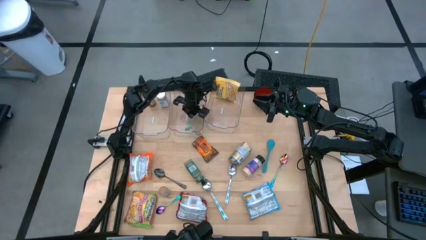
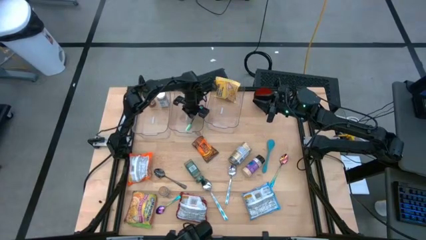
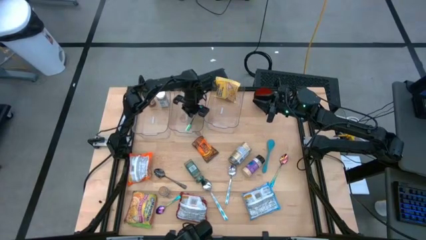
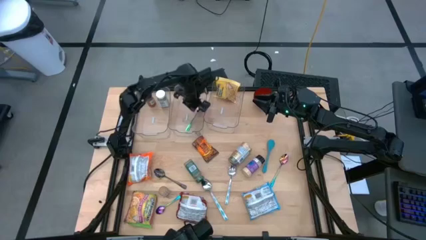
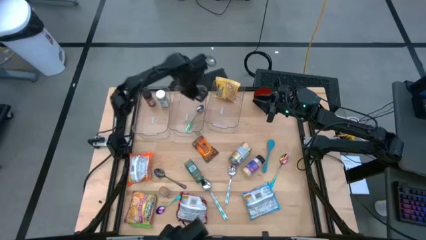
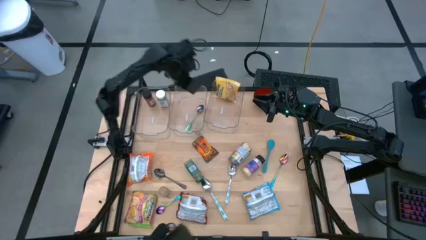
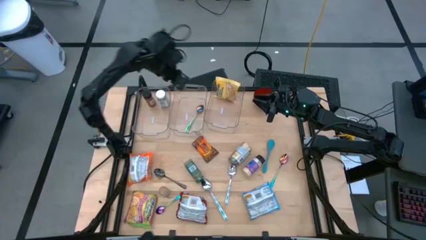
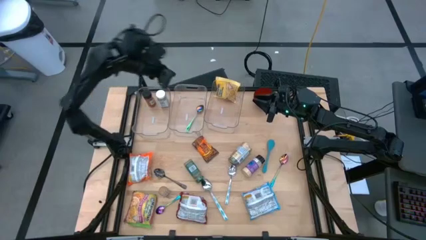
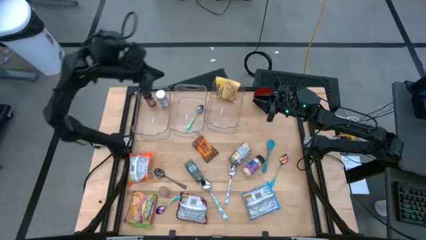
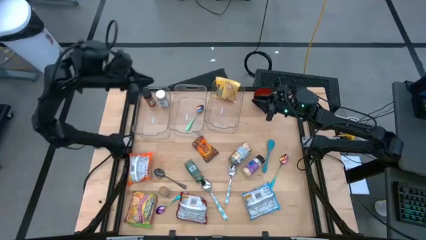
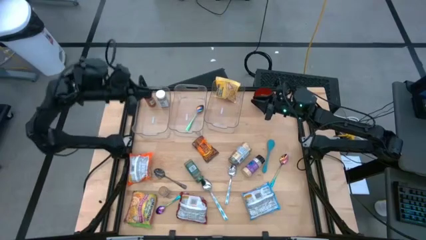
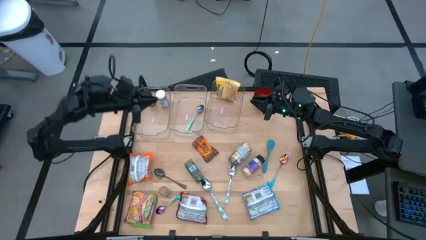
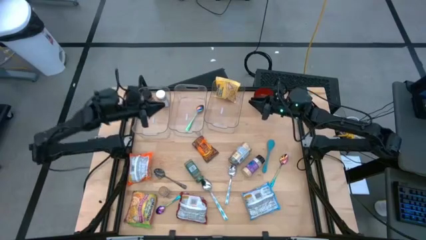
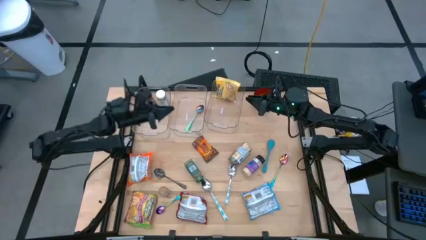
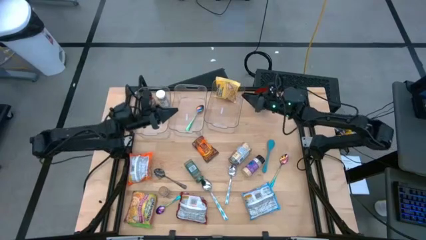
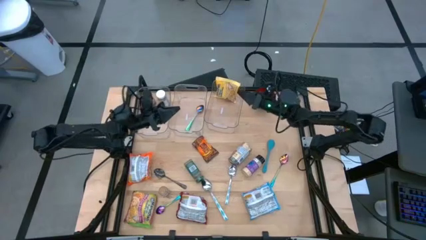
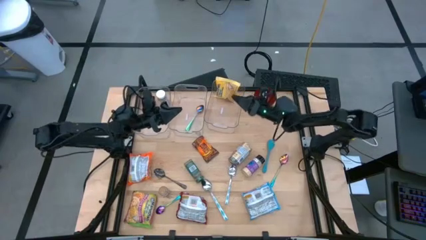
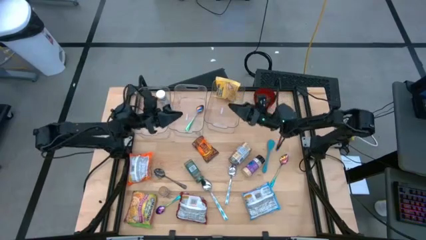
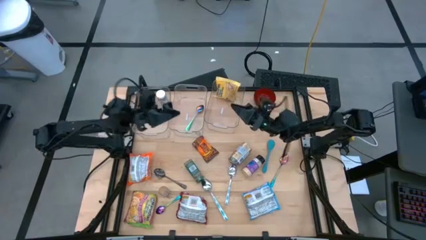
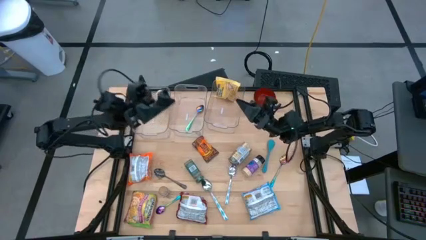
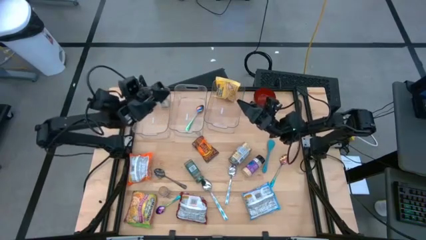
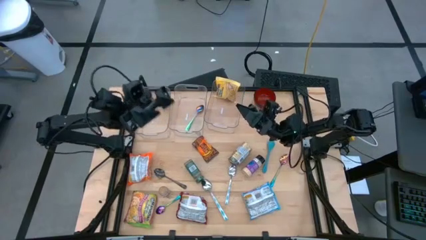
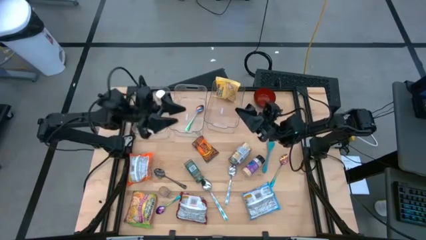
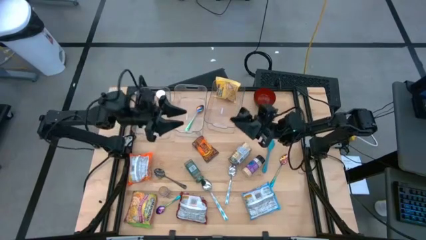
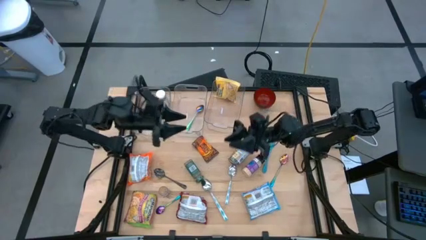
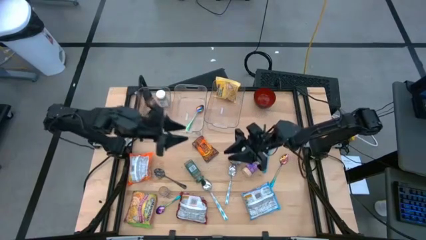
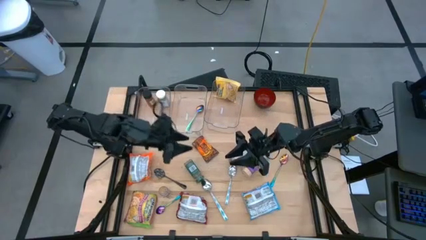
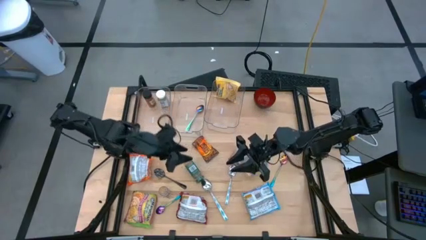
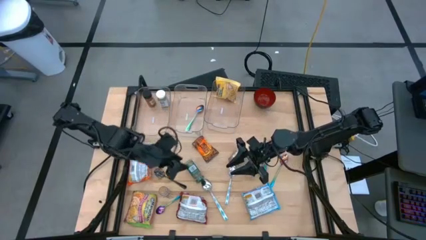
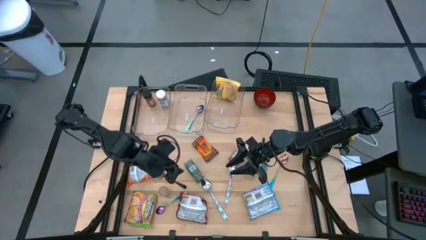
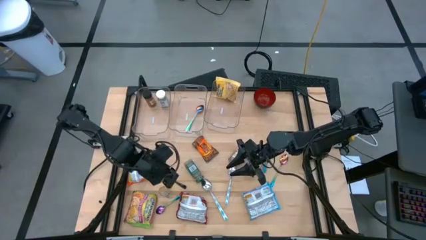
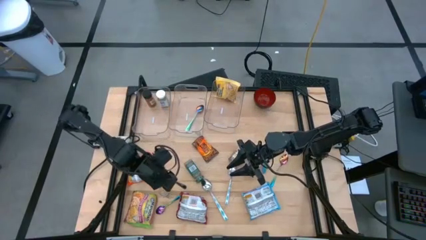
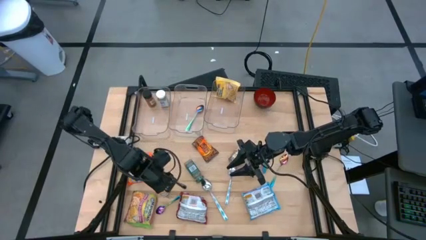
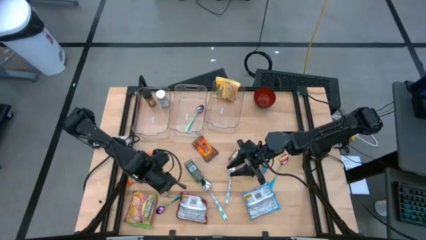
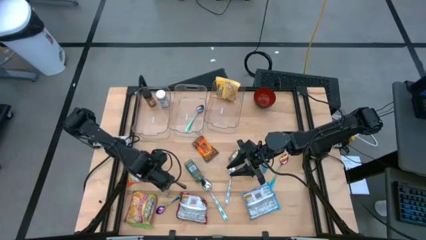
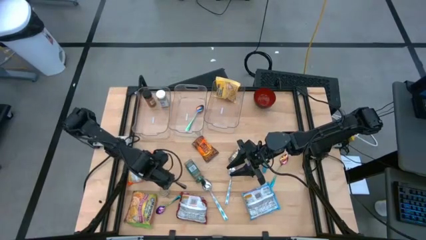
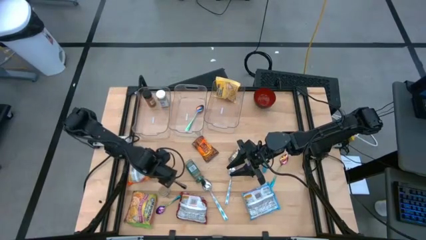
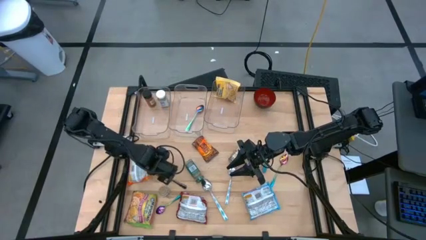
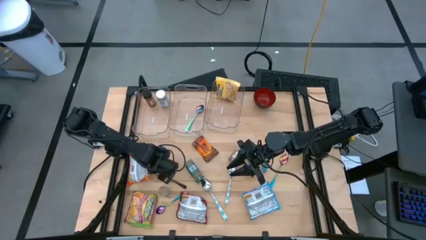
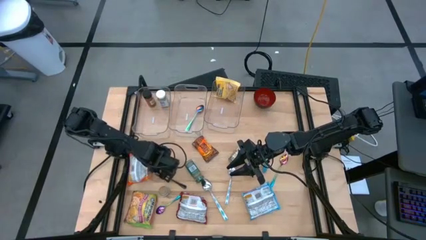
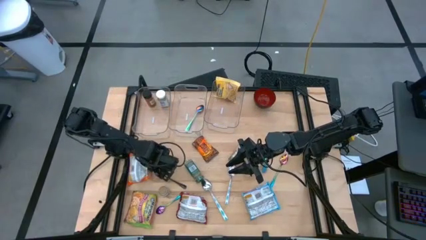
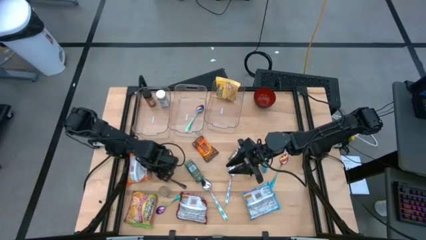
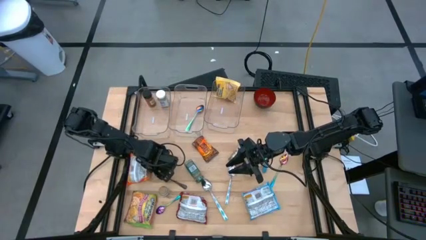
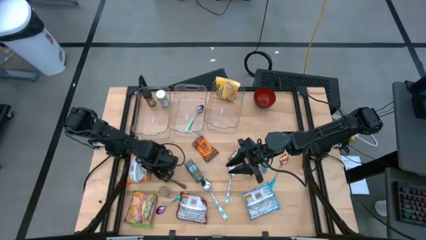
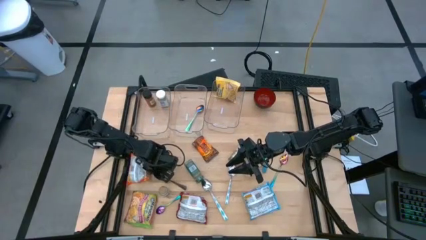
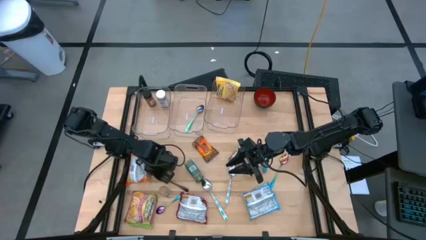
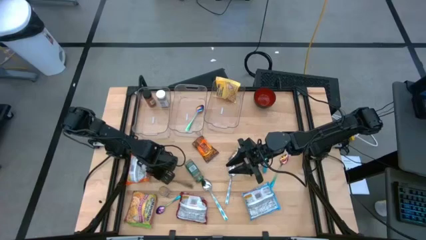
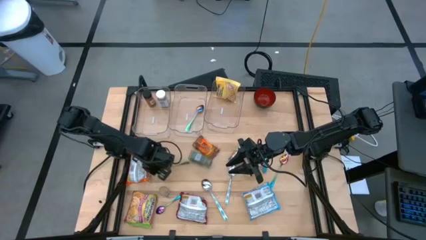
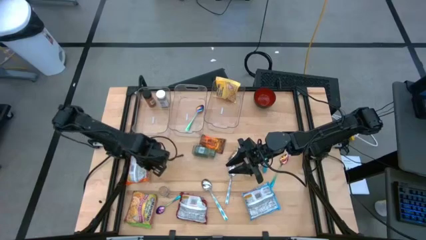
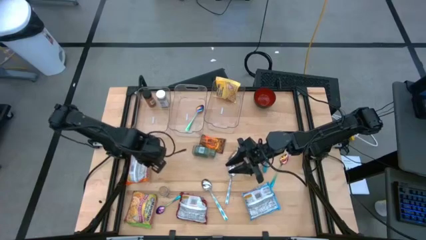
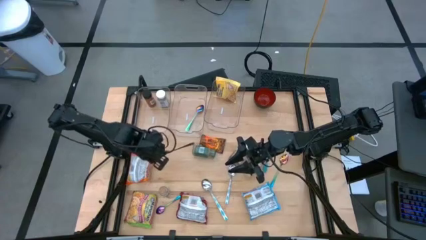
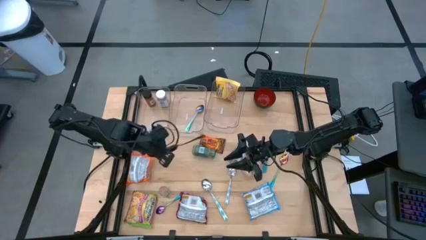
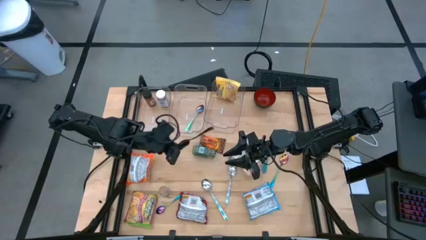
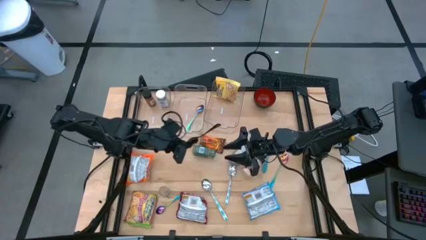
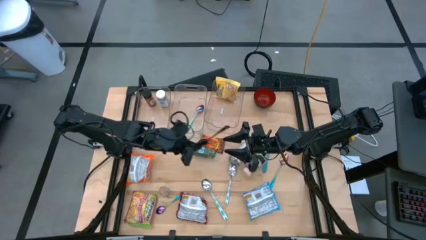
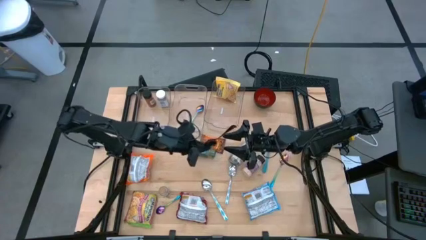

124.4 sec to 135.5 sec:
Task: Pick & Place Food Item
Put the black spoon into the middle transparent bin

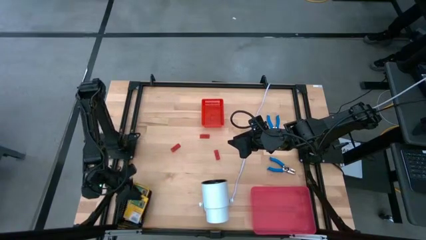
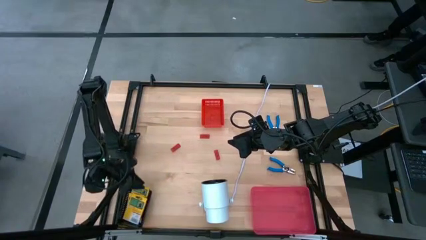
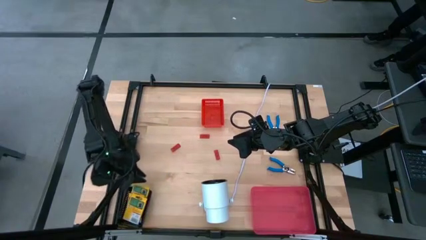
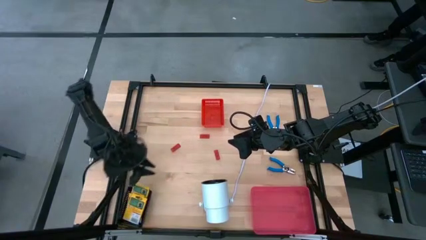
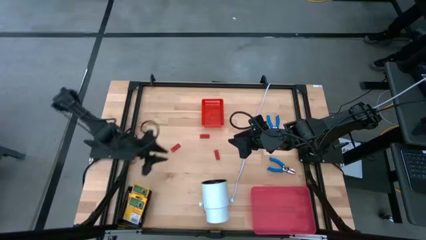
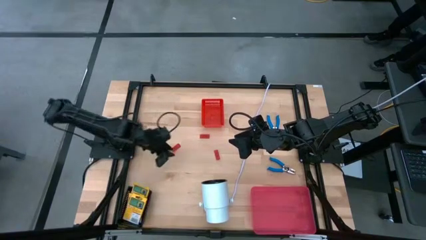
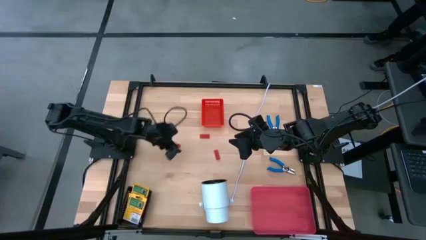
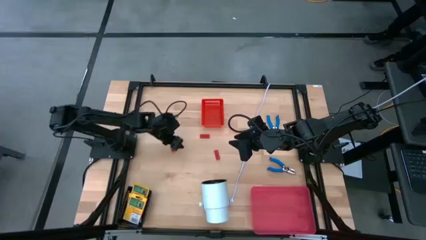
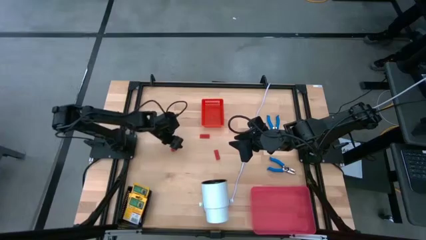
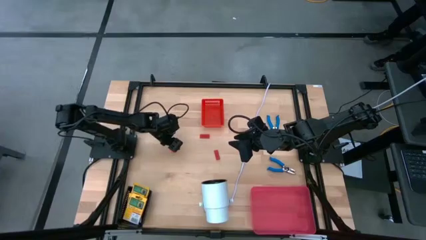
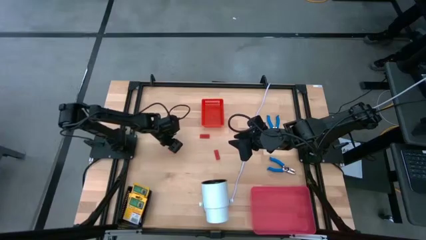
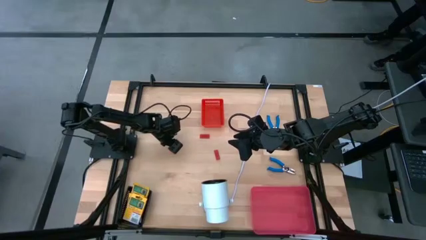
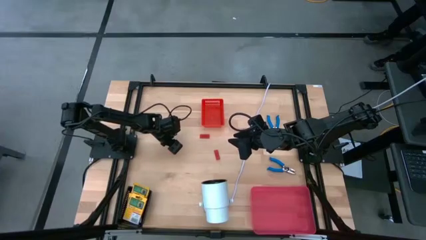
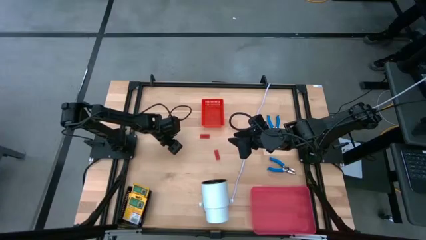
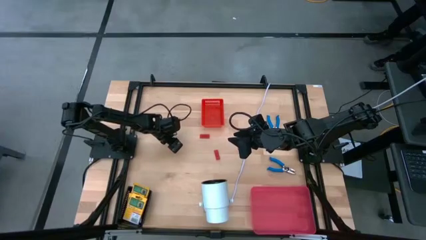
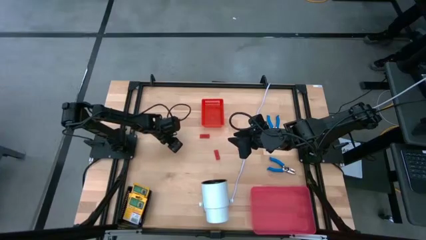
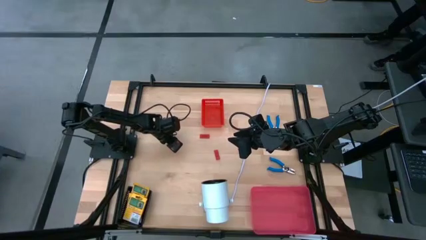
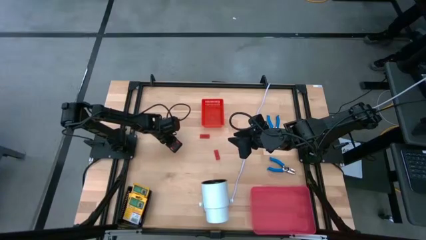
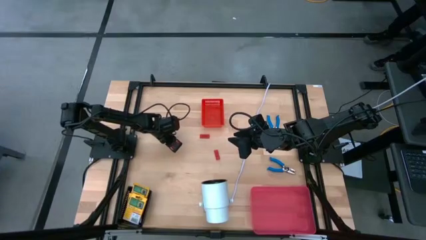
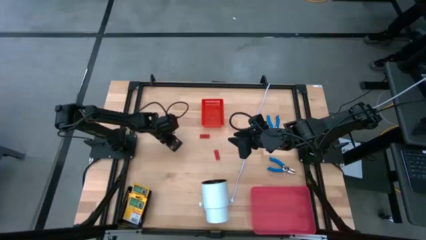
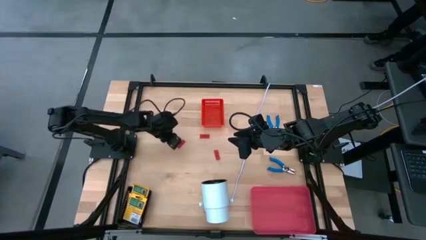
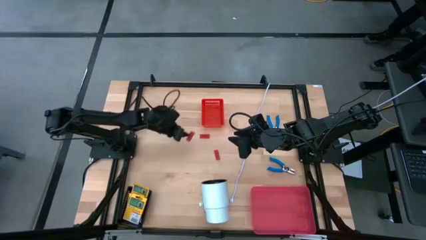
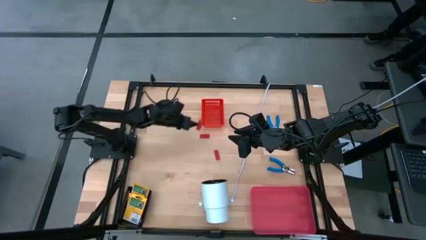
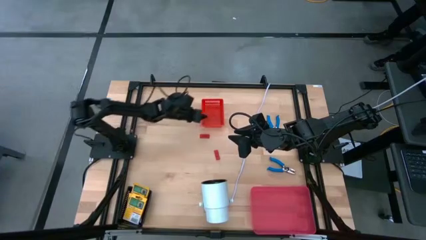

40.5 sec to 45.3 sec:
Task: Pick & Place School Supplies
Put the red eraser into the red bin
